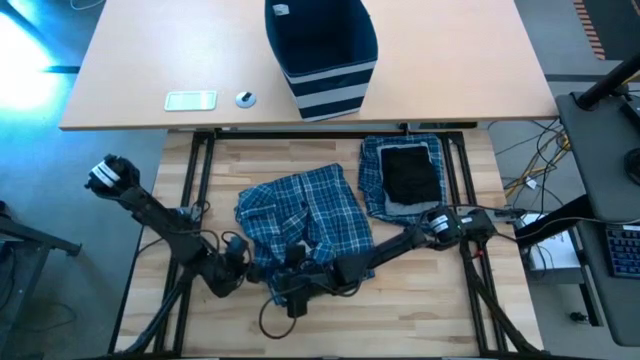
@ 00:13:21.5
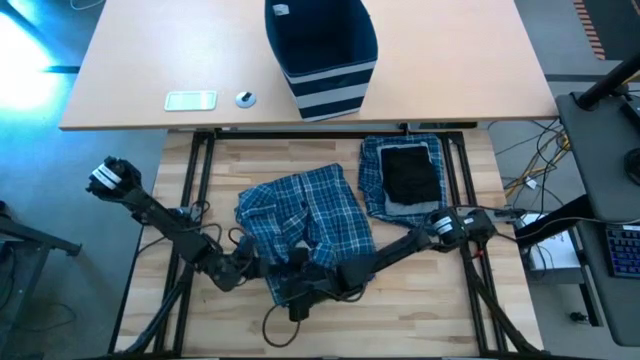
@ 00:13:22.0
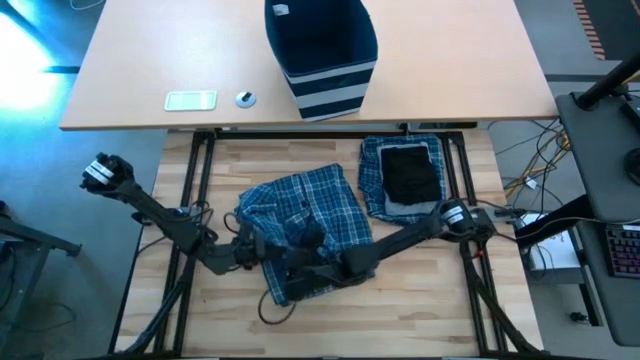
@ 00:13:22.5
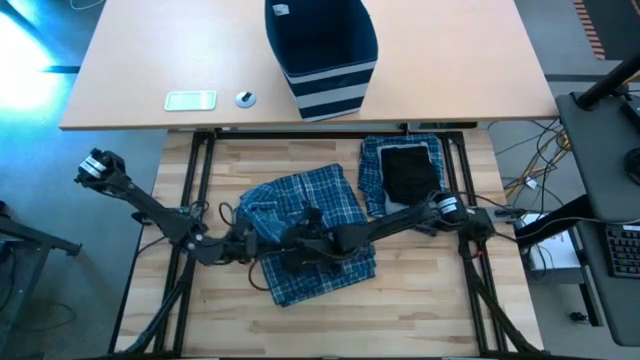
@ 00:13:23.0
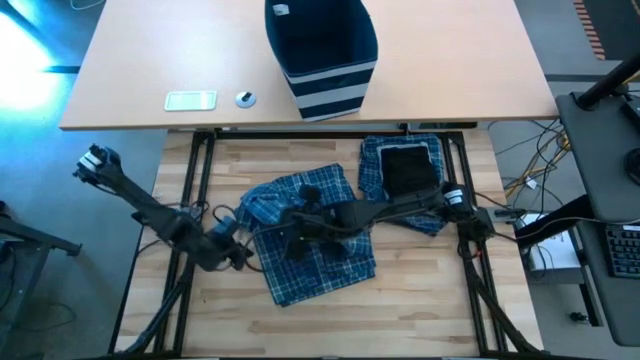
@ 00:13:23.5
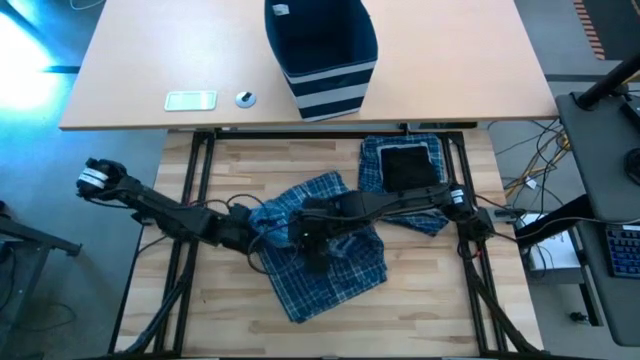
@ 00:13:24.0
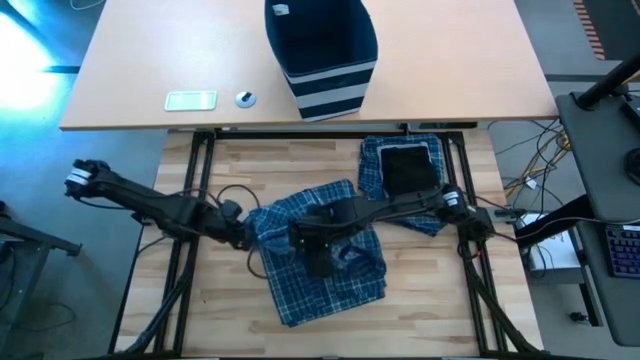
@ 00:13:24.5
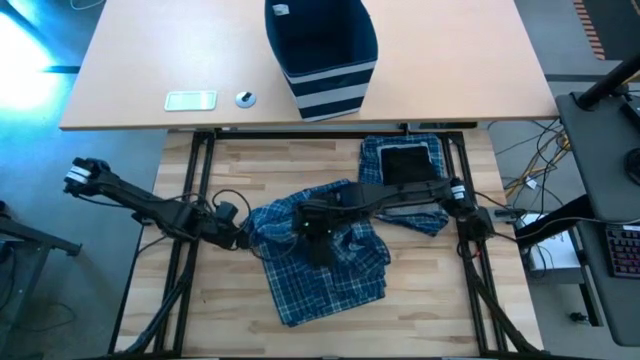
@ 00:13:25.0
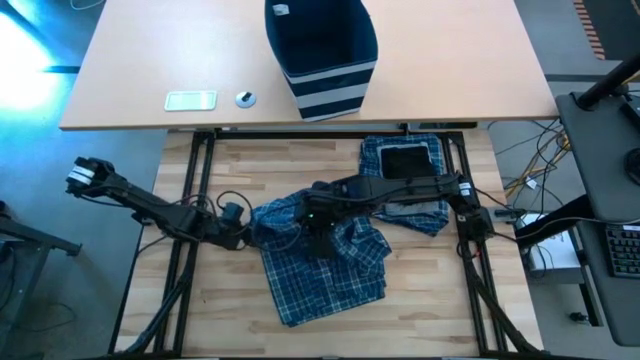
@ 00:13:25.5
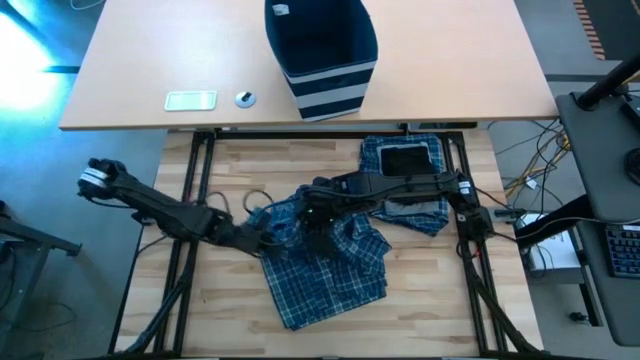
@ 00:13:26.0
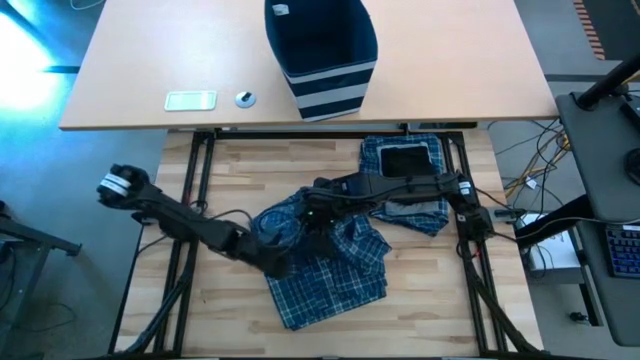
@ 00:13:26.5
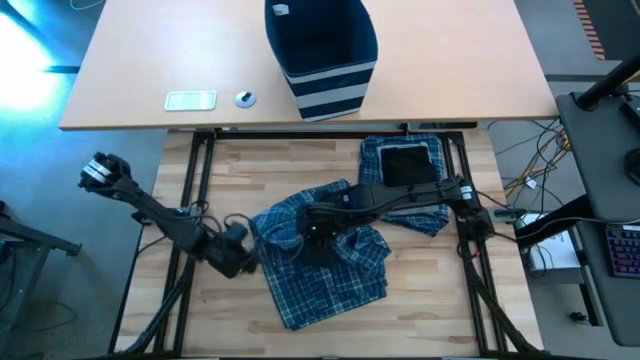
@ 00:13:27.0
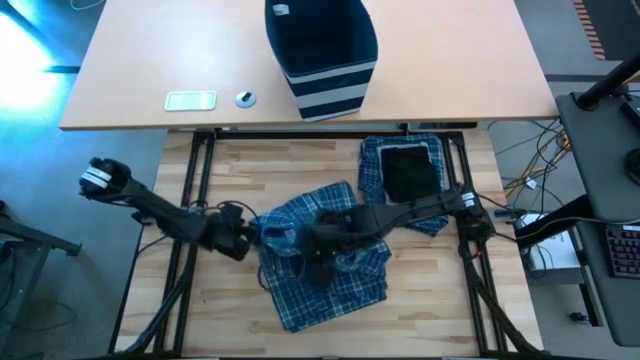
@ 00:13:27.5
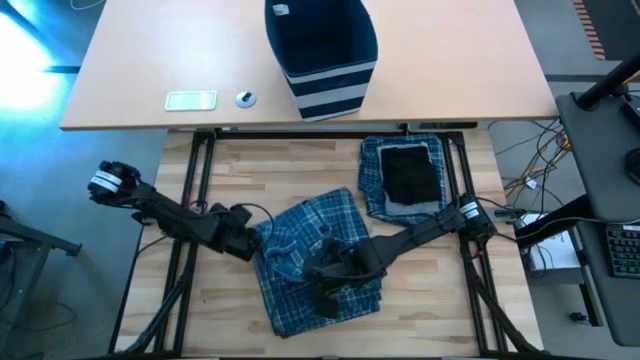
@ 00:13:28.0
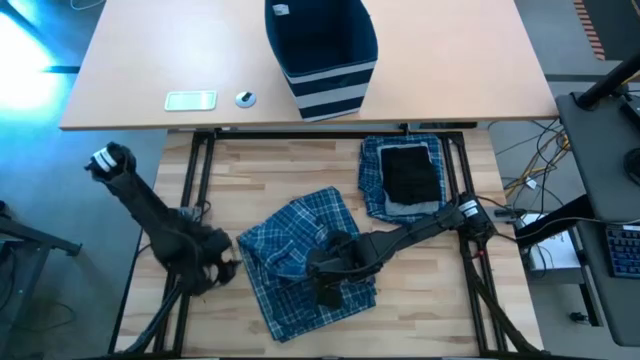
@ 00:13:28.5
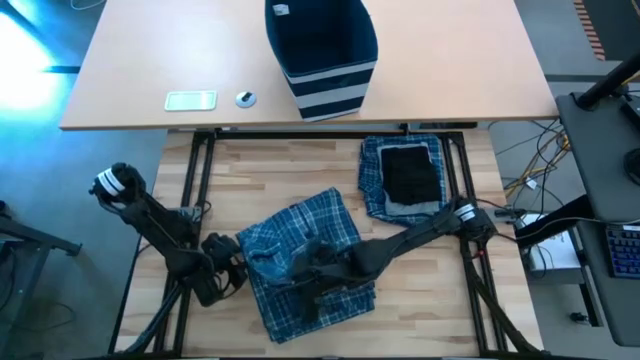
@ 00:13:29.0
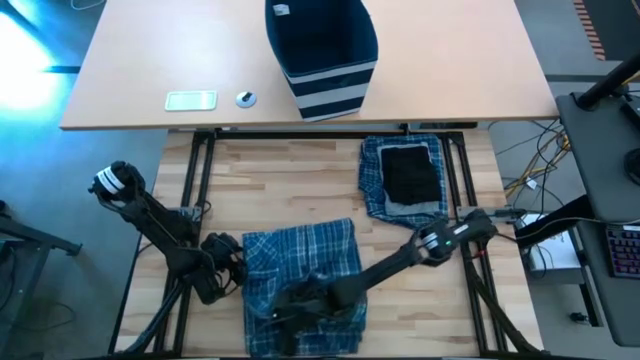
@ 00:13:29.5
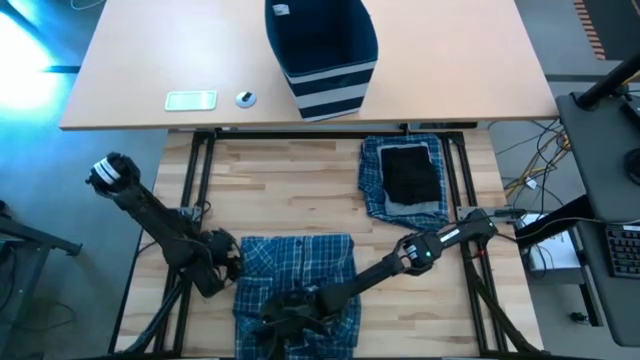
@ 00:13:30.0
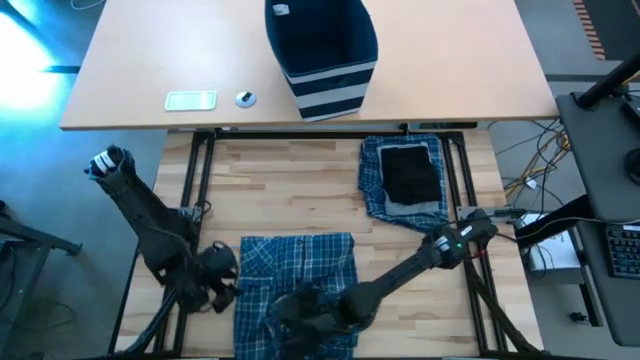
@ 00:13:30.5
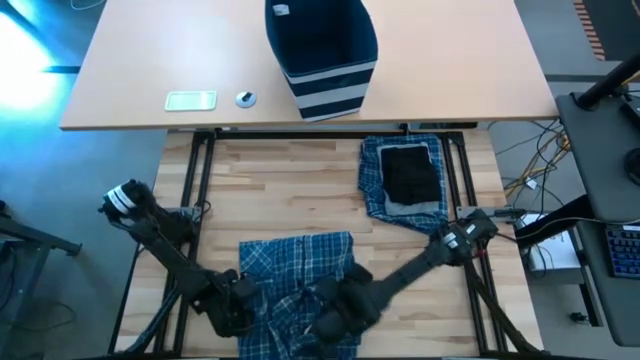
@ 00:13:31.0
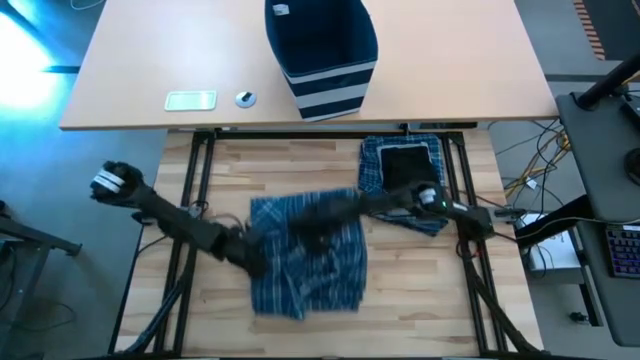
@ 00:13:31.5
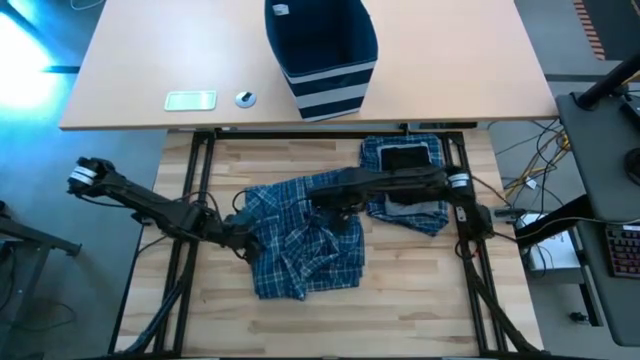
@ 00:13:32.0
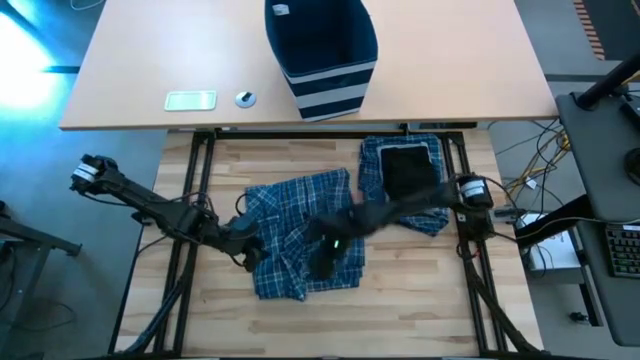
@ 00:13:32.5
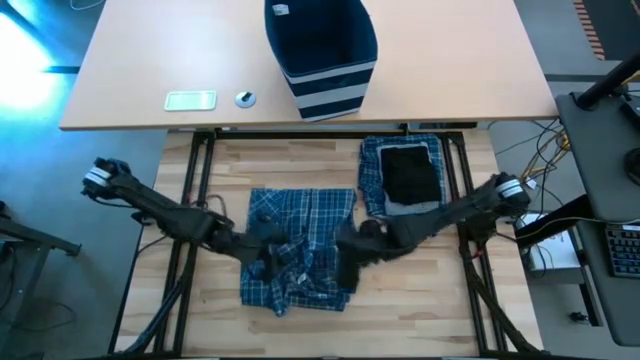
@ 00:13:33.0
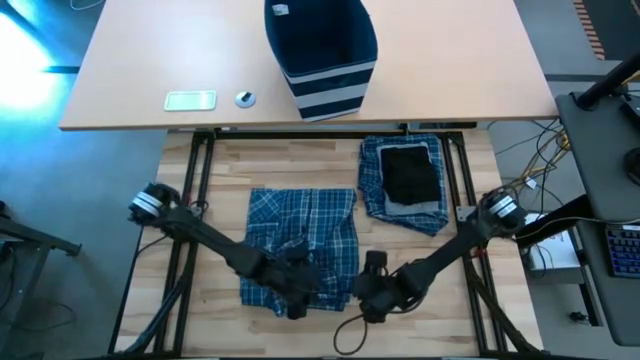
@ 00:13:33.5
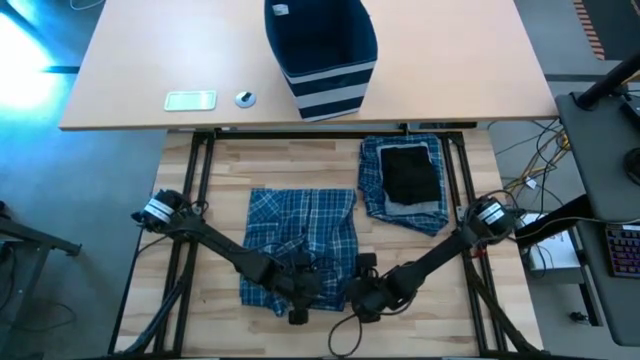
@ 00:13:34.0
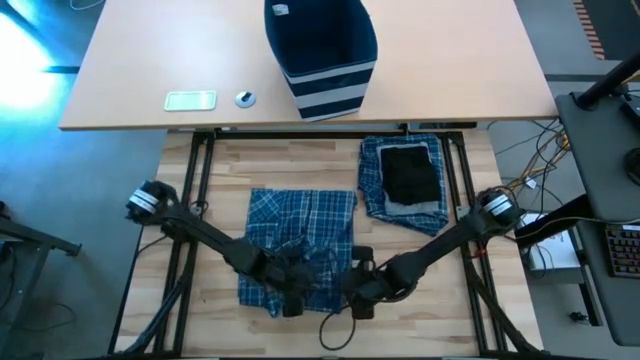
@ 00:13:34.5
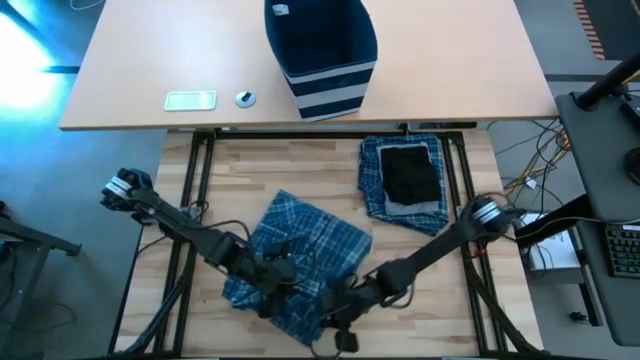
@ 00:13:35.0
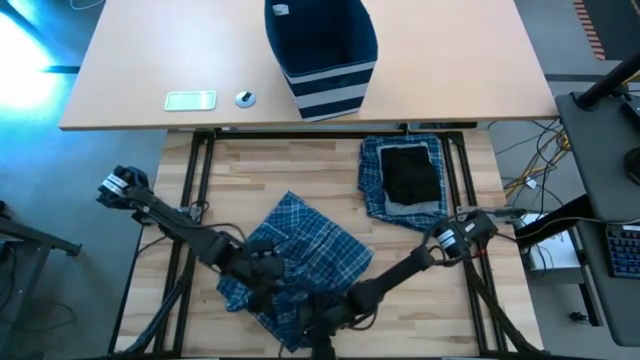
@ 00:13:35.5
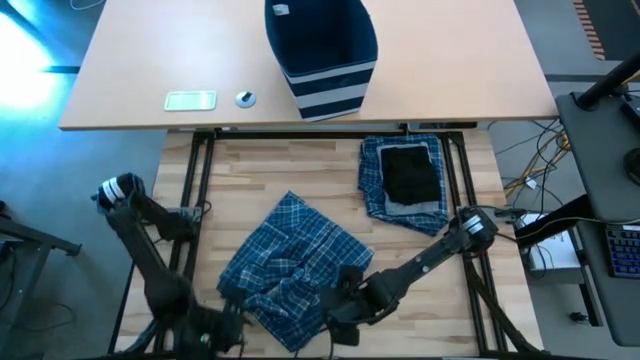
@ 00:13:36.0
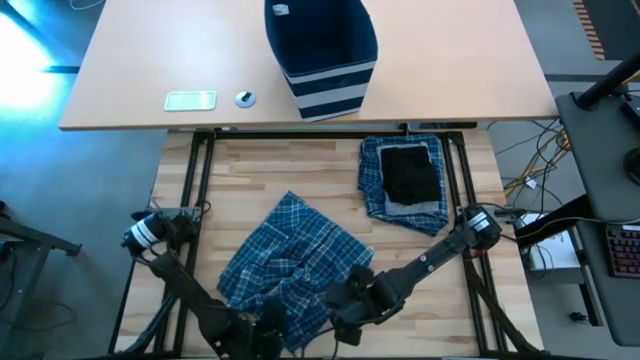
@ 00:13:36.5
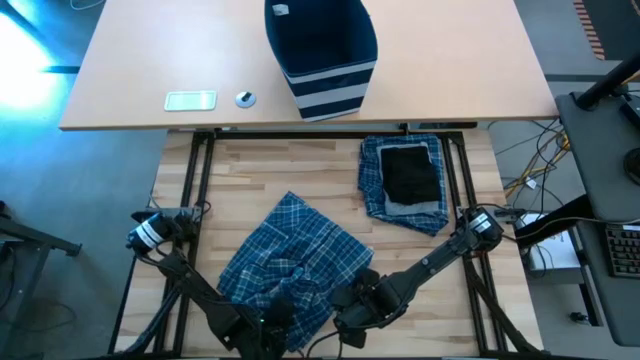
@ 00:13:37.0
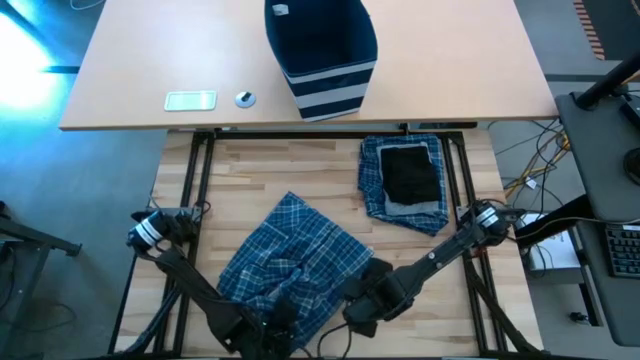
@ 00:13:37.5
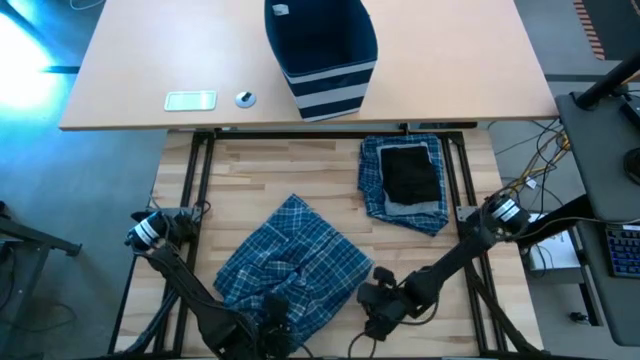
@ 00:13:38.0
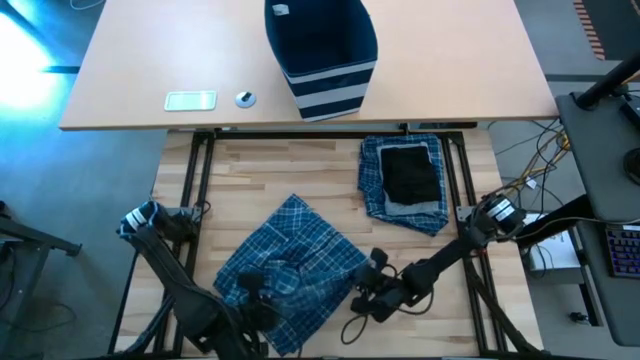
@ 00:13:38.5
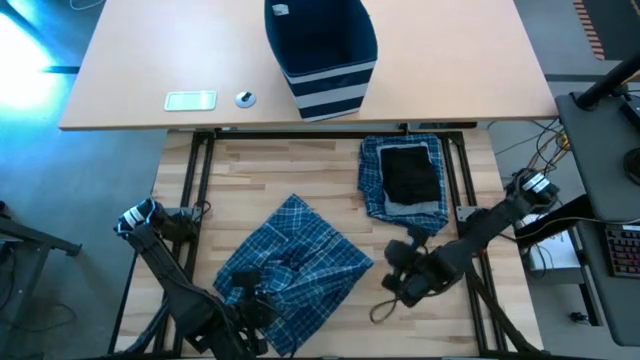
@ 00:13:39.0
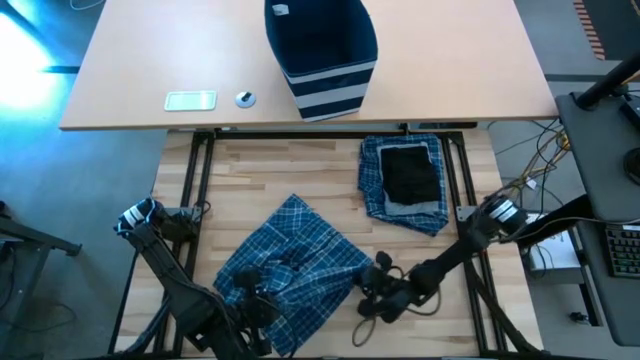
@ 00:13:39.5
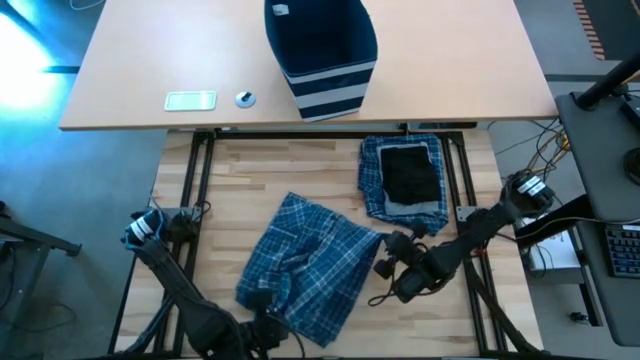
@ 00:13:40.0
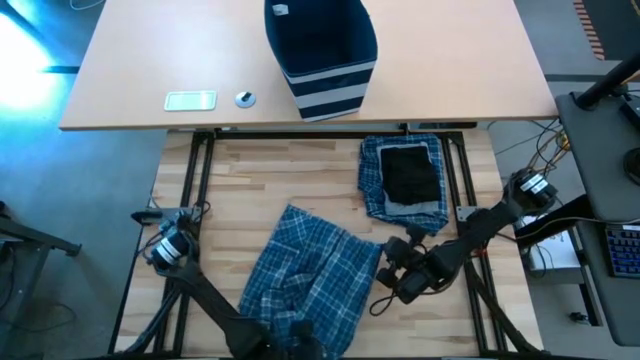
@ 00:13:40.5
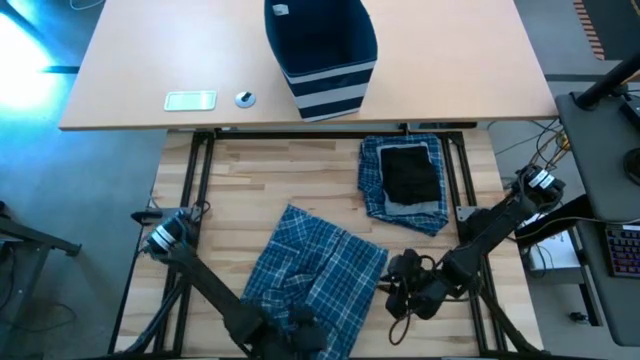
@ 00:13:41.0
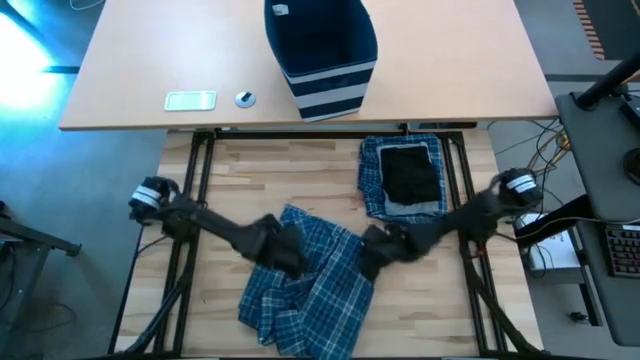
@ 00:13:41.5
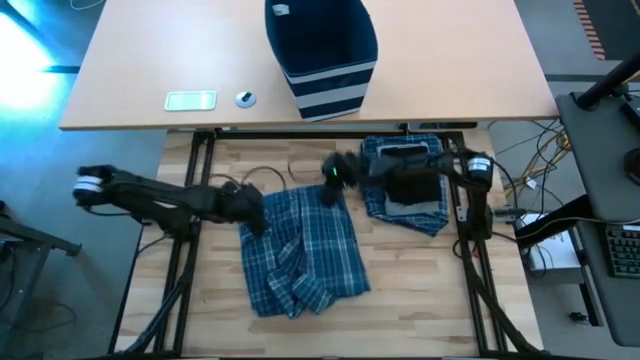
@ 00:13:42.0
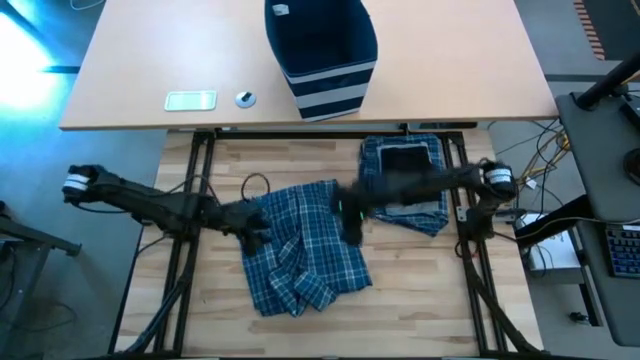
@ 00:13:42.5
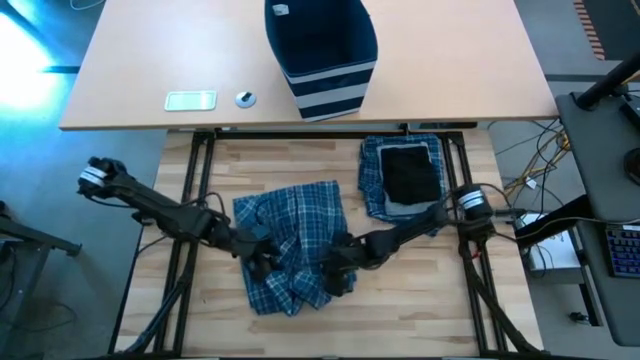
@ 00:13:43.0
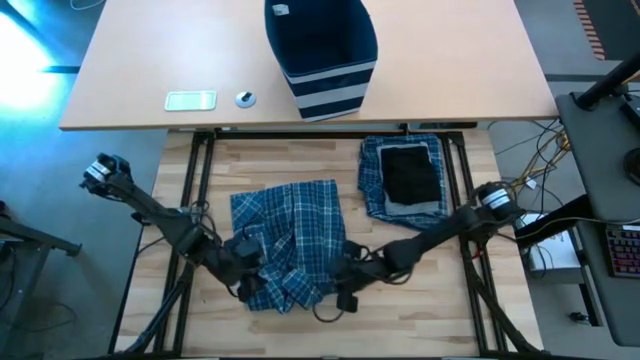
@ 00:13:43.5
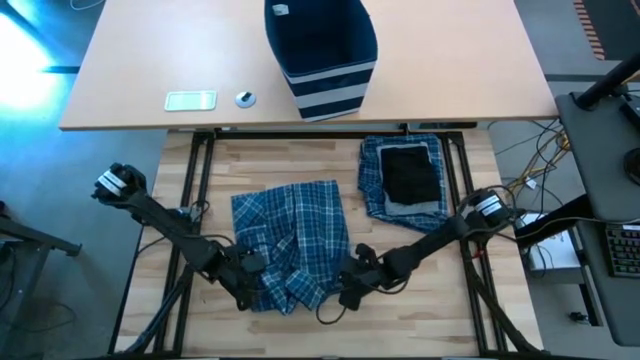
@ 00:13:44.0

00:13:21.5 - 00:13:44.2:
Task: Fold Laundry from Bin
Fold the blue patterned long sleeve
